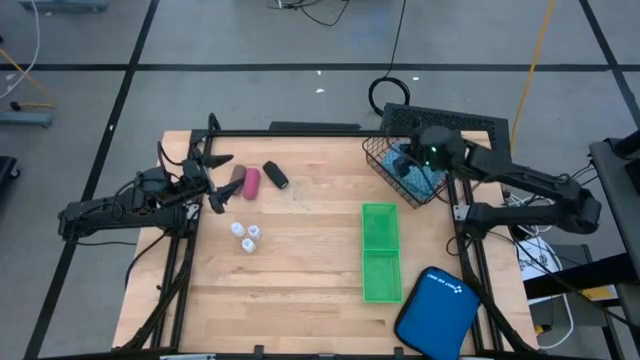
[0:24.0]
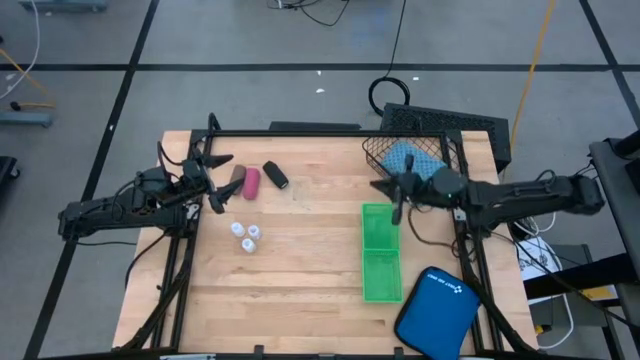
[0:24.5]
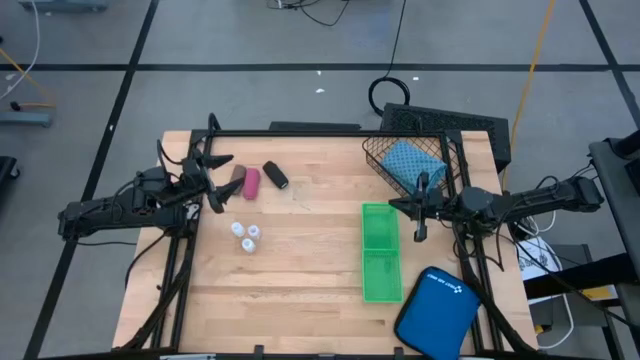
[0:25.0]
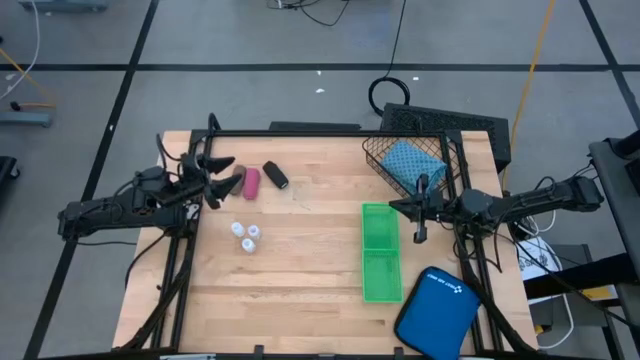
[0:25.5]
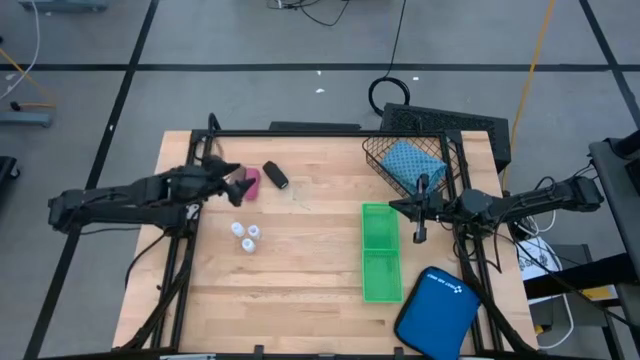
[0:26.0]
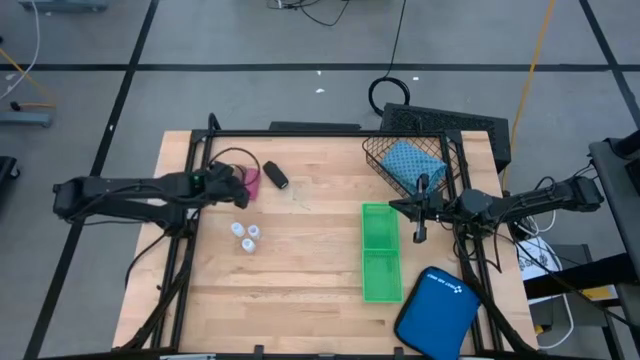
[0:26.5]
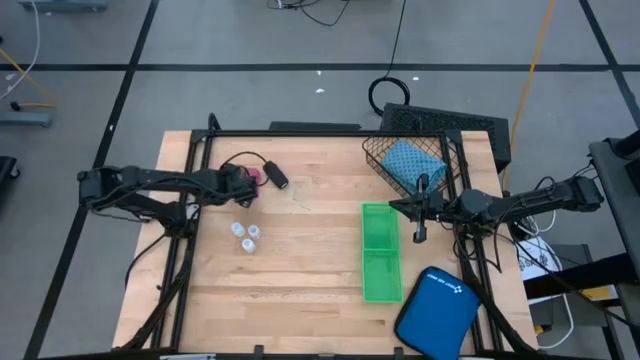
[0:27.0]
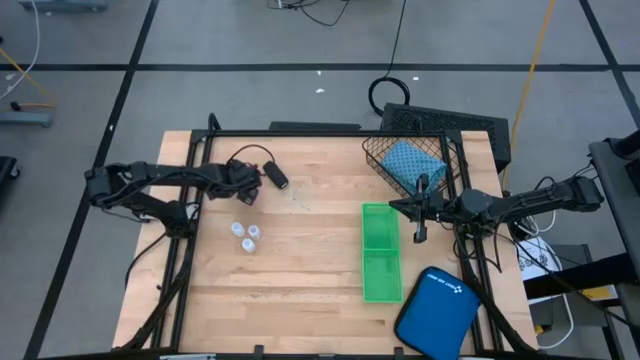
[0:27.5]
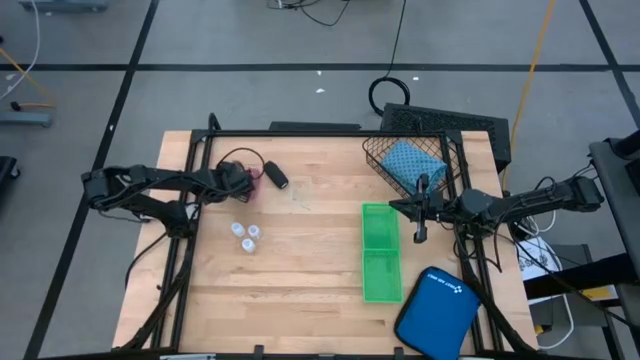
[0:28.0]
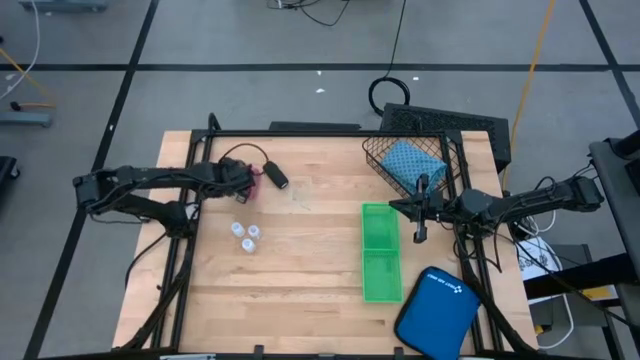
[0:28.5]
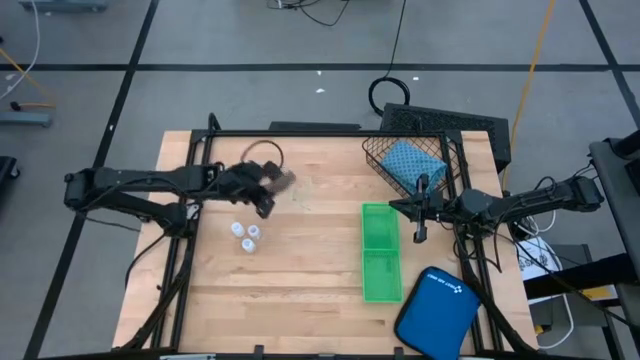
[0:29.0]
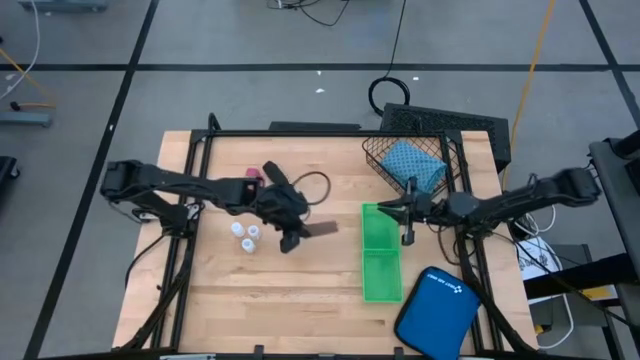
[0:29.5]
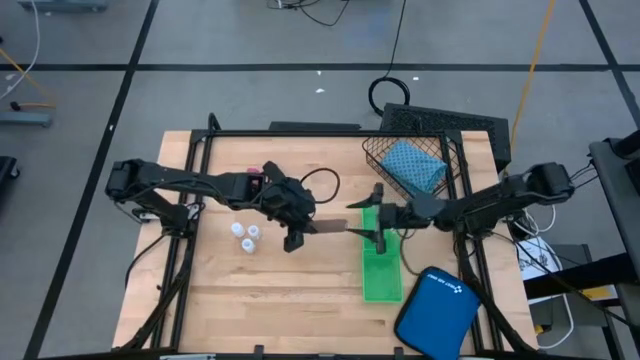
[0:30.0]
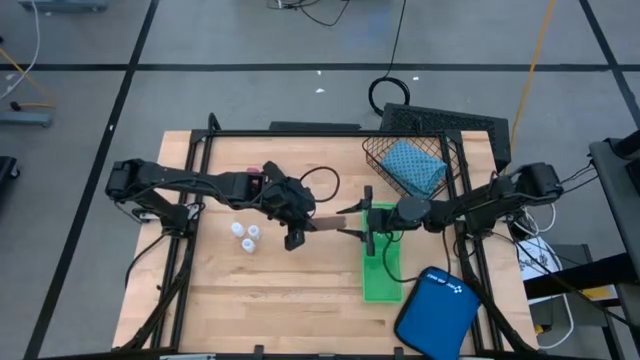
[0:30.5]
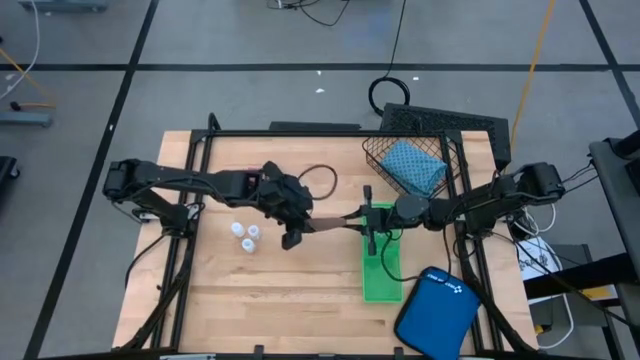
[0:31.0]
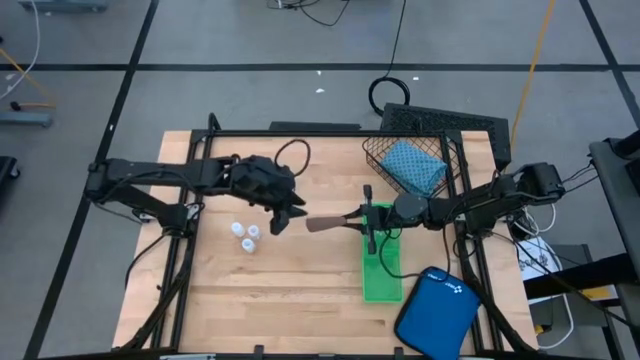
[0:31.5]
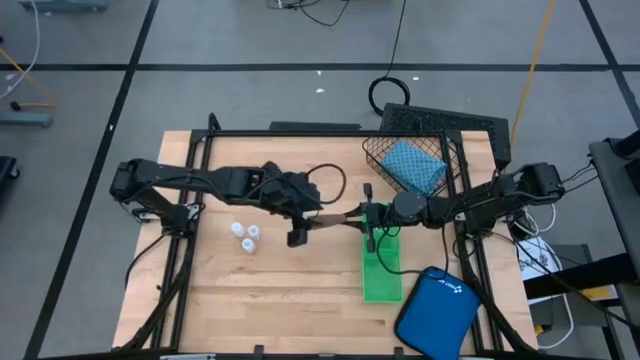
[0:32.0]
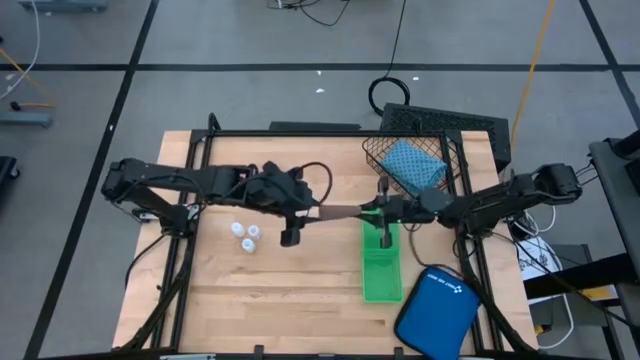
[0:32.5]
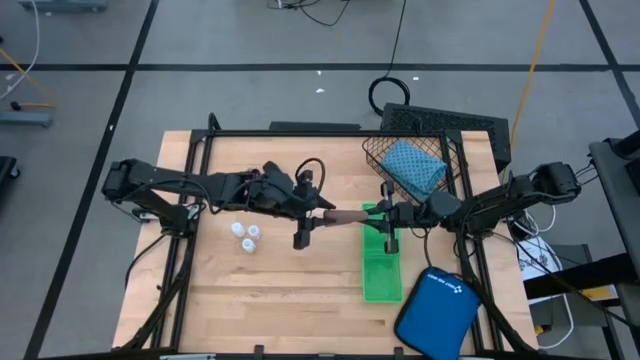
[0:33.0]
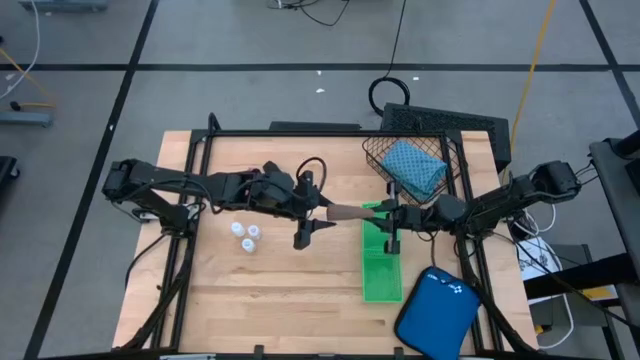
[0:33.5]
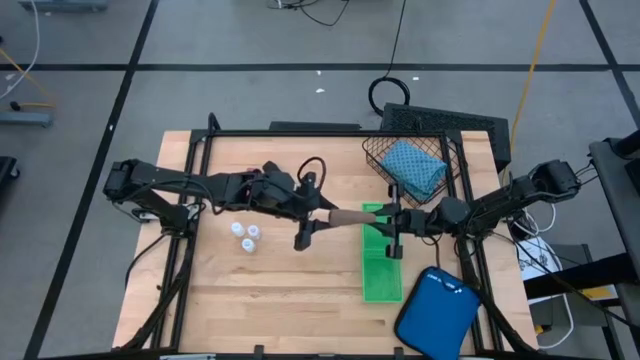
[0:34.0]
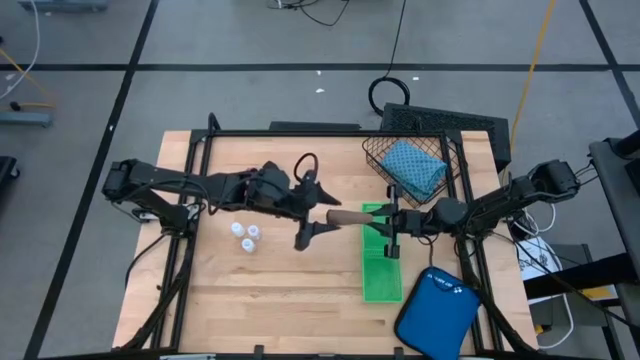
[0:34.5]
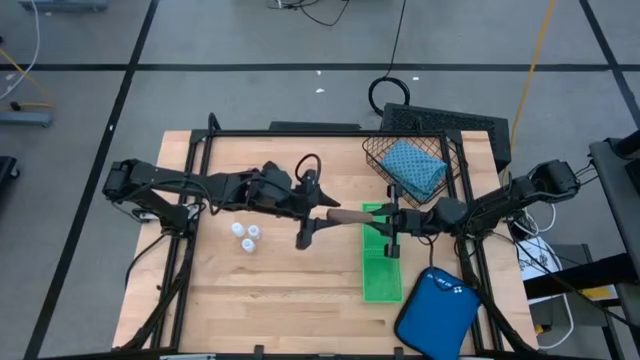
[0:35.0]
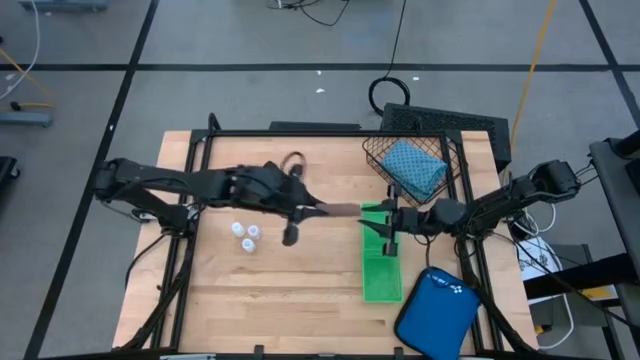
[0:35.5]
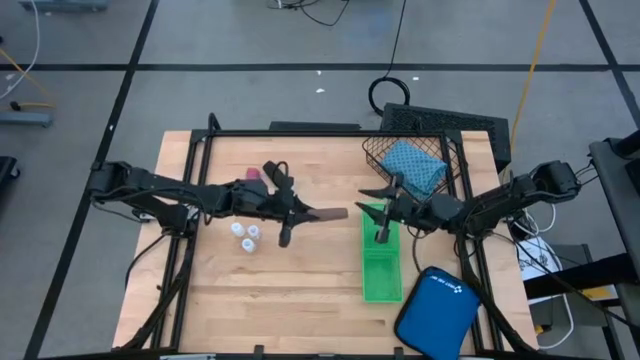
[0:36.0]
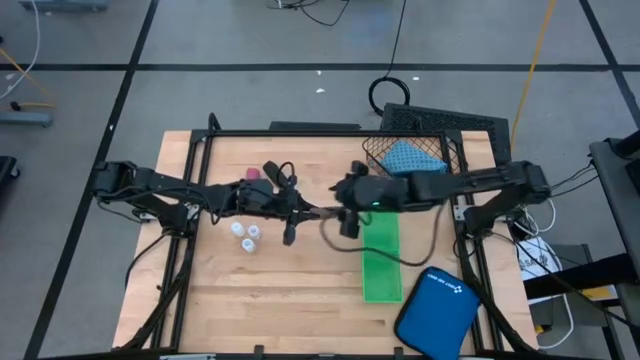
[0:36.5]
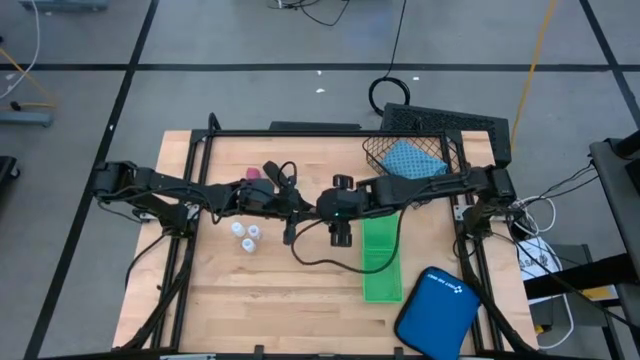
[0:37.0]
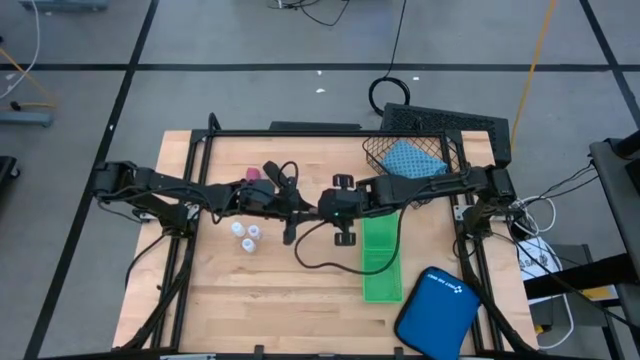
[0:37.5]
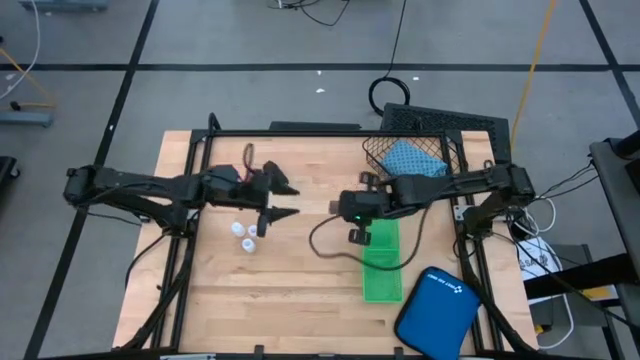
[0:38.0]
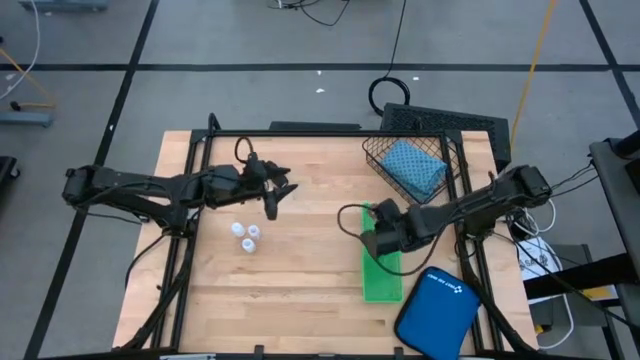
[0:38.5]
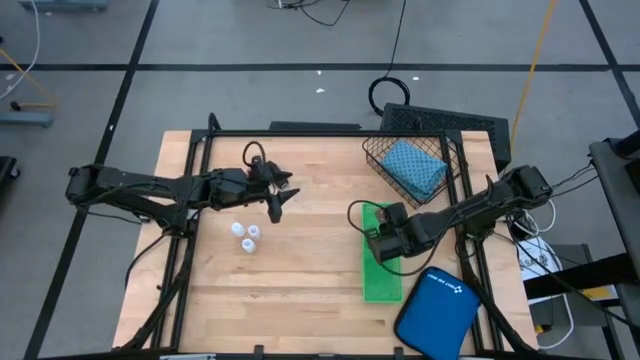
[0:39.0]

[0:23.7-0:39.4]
Task: Pick & Place Medicine items
Put the brown bandage into the top green basket

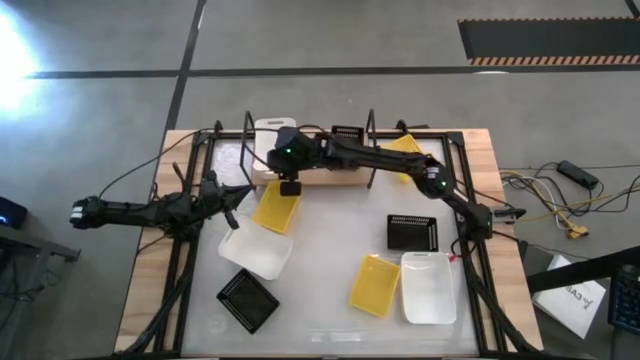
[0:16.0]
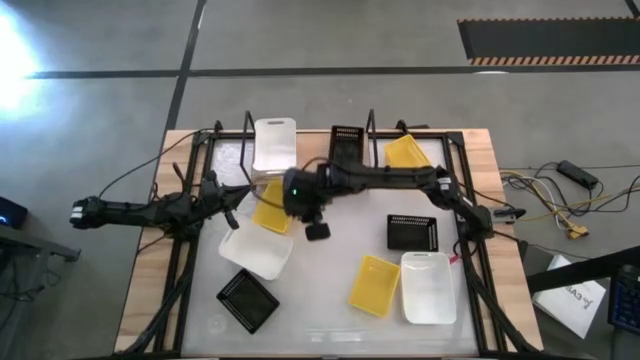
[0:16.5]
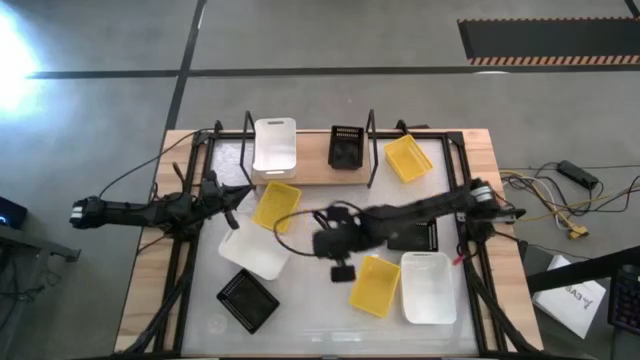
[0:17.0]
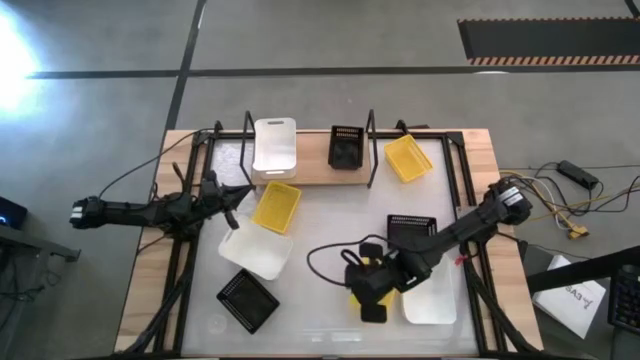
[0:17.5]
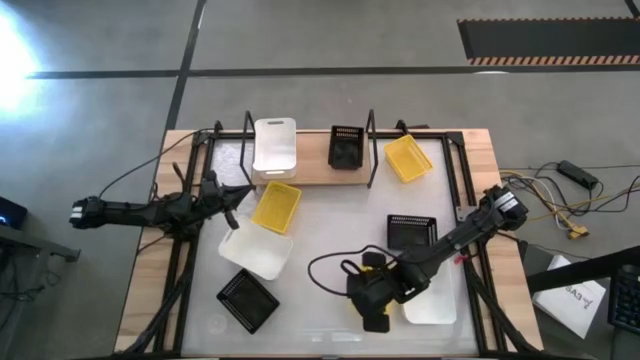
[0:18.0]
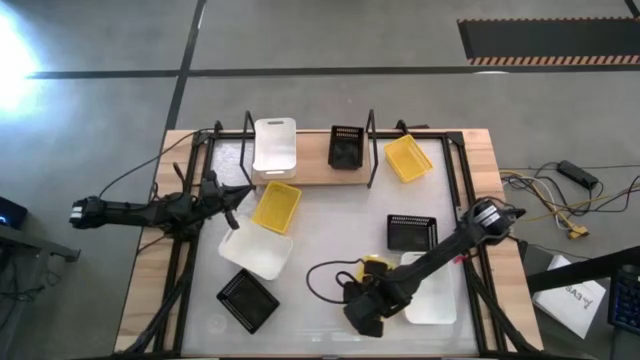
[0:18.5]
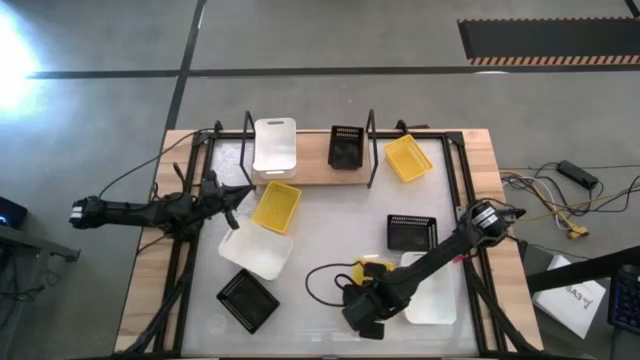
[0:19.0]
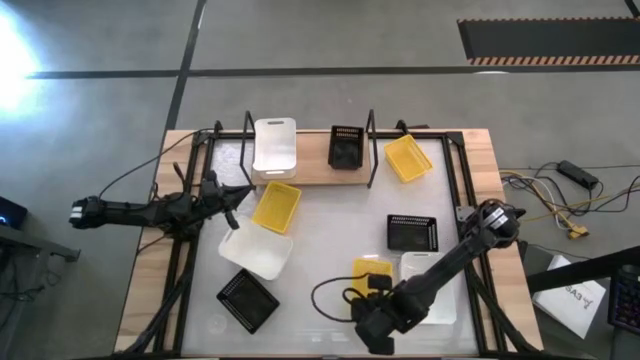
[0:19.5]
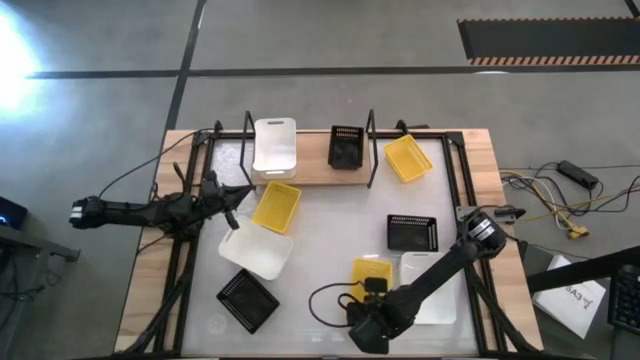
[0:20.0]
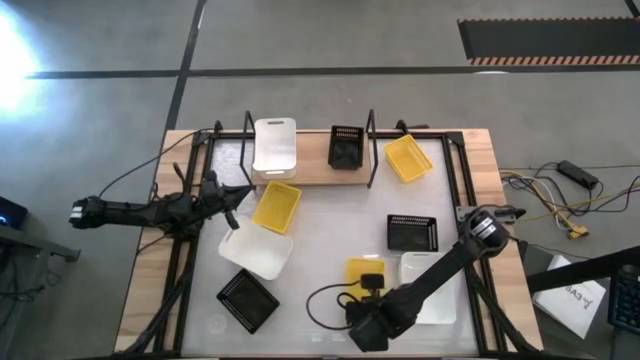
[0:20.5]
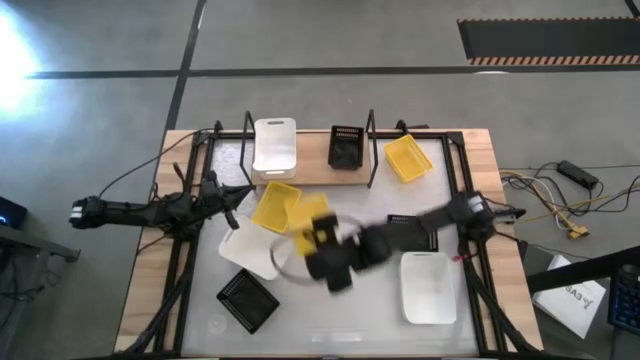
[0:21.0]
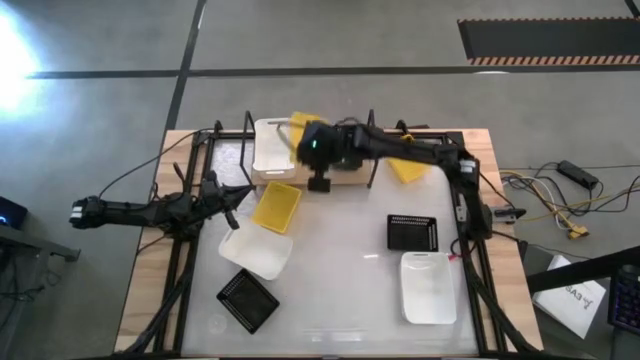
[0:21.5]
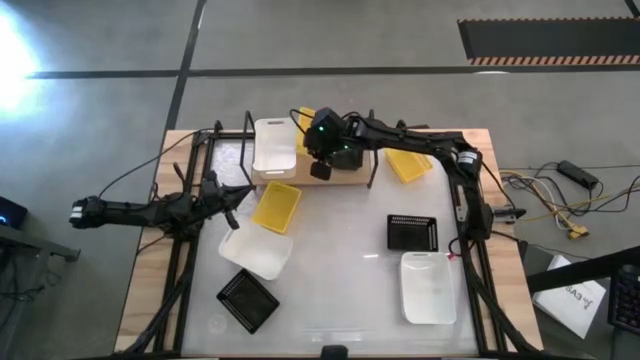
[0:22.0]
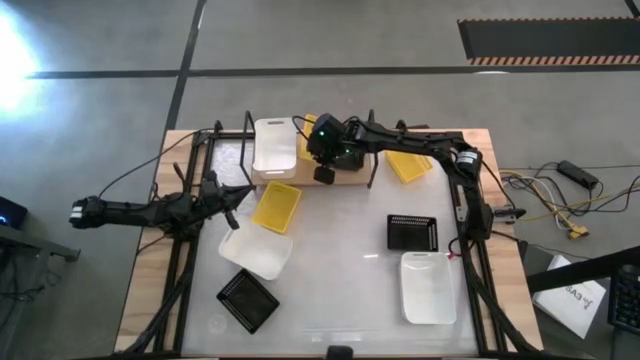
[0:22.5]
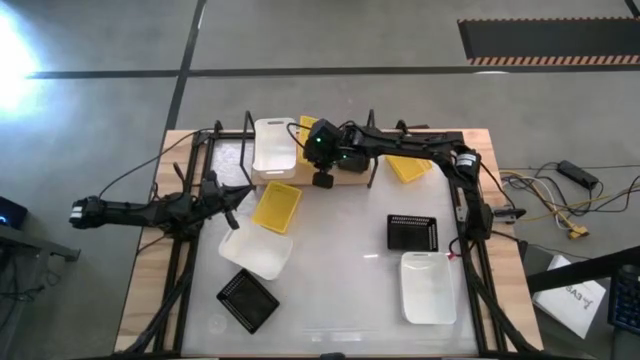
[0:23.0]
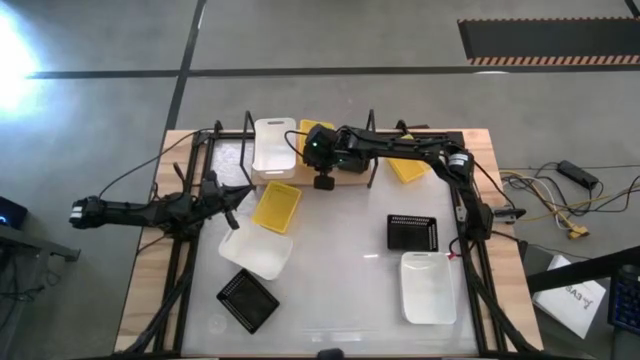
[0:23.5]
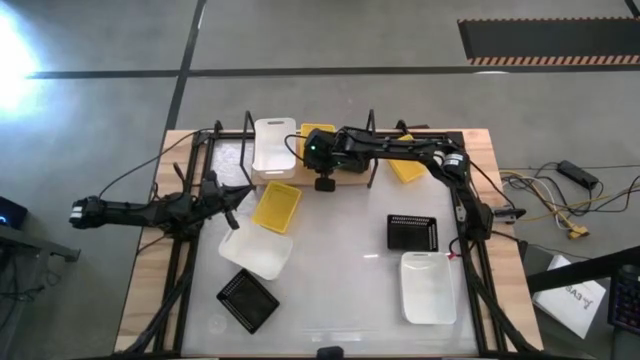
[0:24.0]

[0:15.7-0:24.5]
Task: Stack baskets on shelf by color
Put the bottom yellow bin on the shelf
